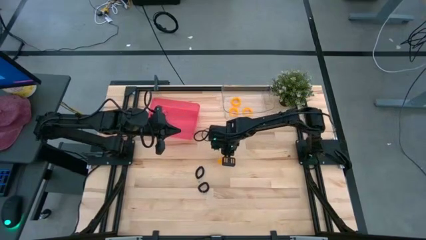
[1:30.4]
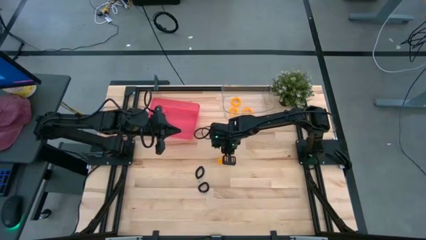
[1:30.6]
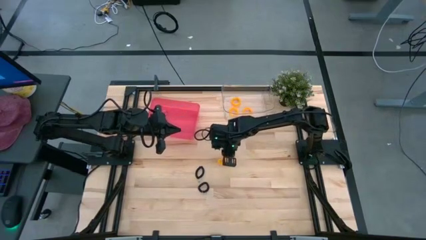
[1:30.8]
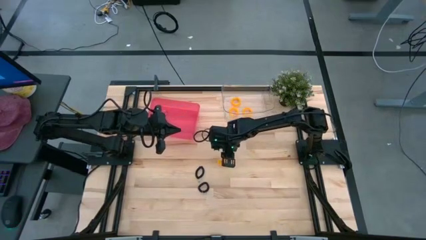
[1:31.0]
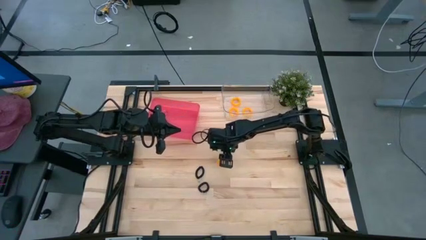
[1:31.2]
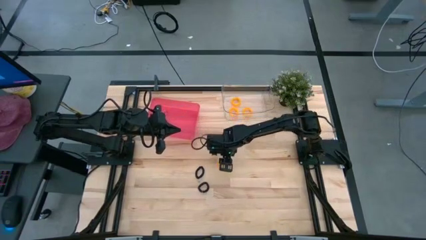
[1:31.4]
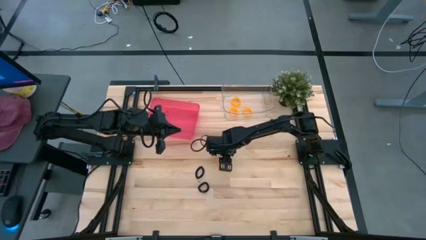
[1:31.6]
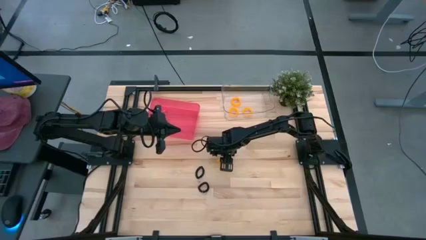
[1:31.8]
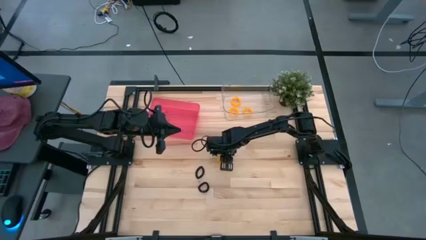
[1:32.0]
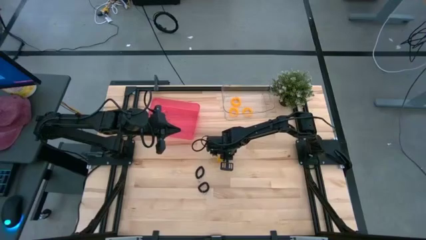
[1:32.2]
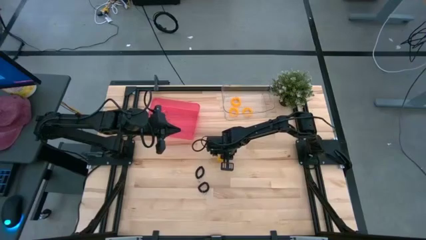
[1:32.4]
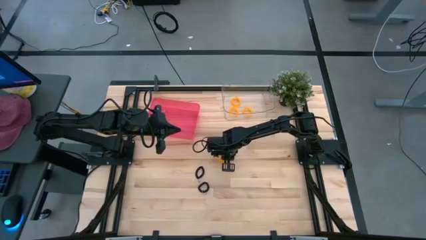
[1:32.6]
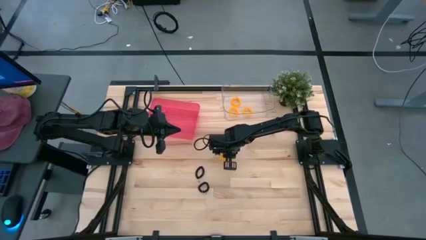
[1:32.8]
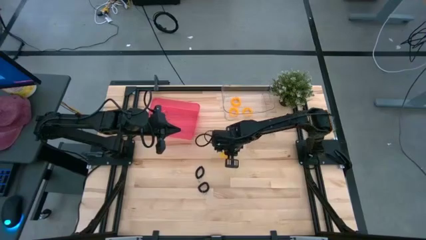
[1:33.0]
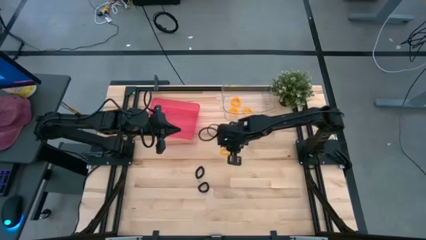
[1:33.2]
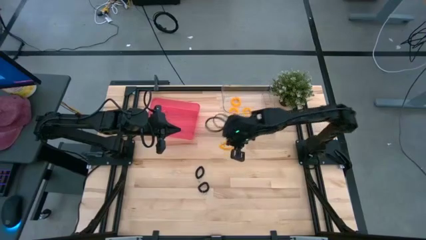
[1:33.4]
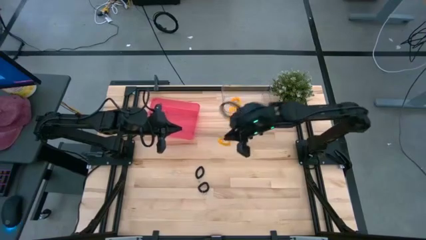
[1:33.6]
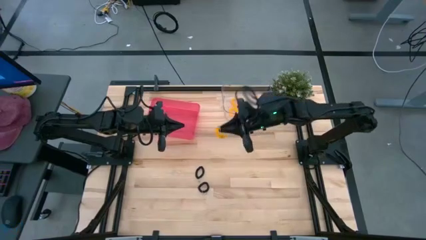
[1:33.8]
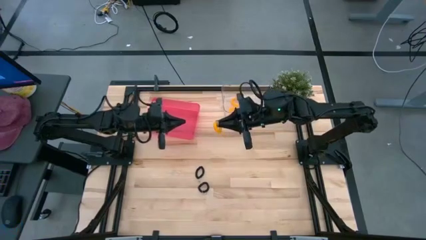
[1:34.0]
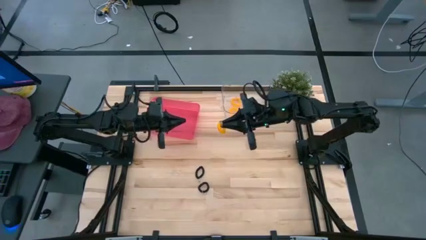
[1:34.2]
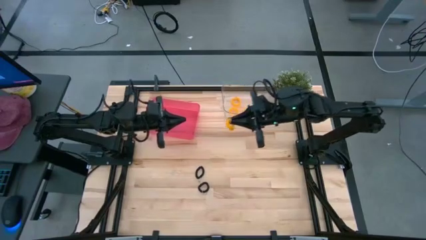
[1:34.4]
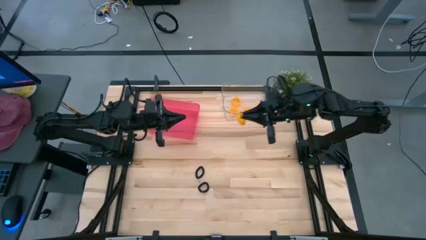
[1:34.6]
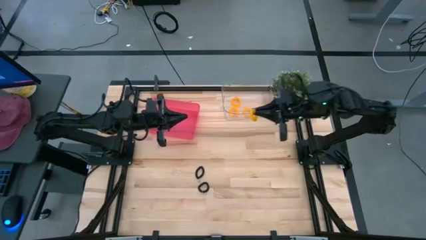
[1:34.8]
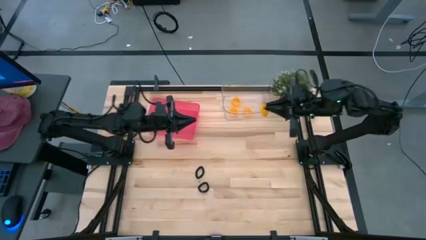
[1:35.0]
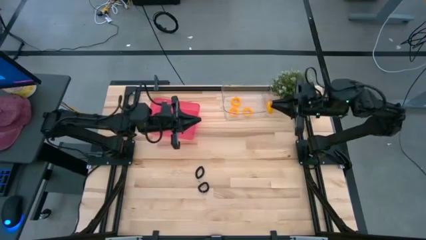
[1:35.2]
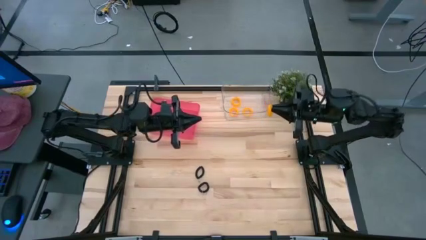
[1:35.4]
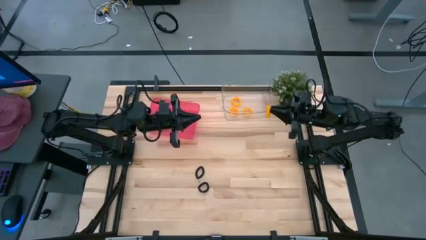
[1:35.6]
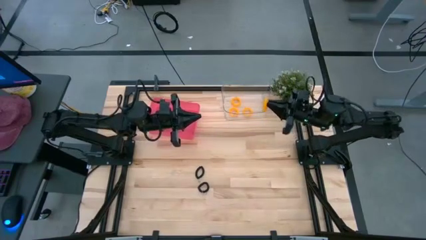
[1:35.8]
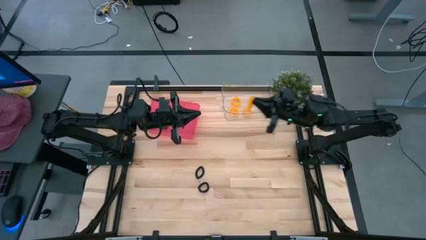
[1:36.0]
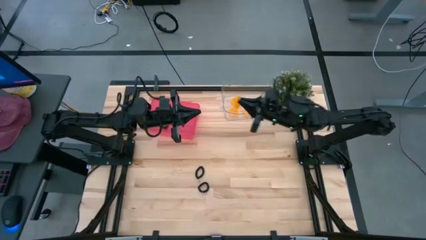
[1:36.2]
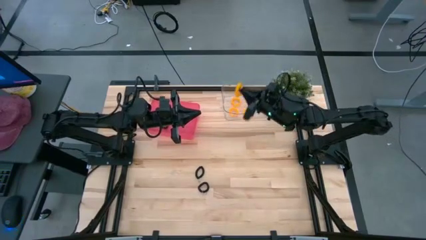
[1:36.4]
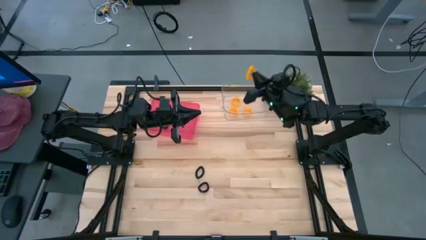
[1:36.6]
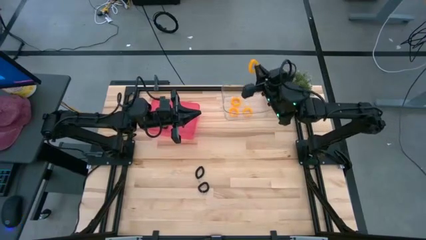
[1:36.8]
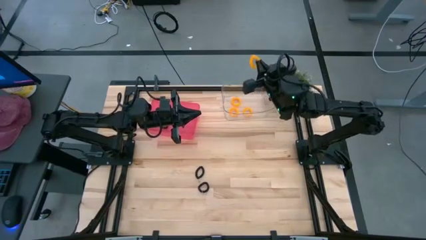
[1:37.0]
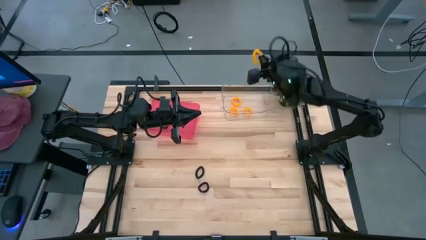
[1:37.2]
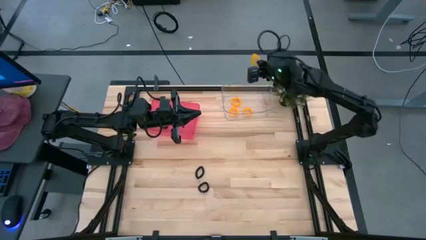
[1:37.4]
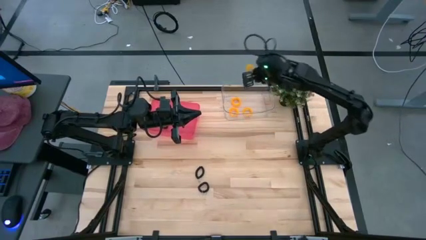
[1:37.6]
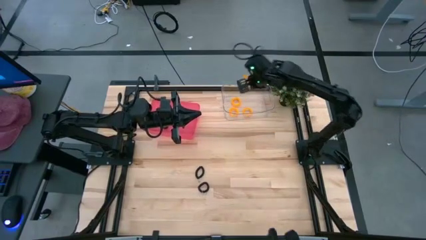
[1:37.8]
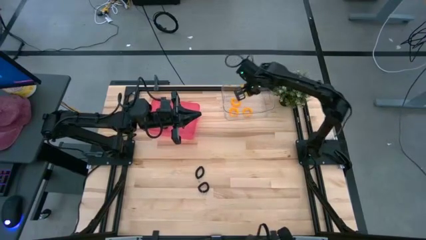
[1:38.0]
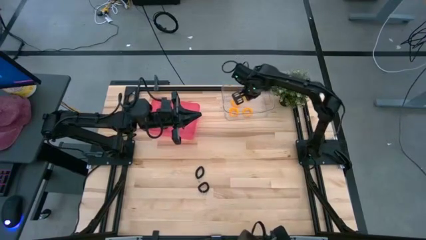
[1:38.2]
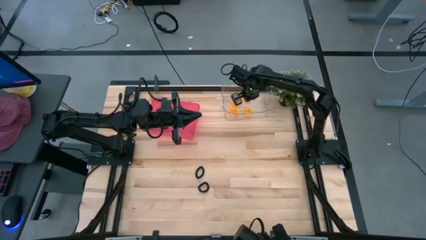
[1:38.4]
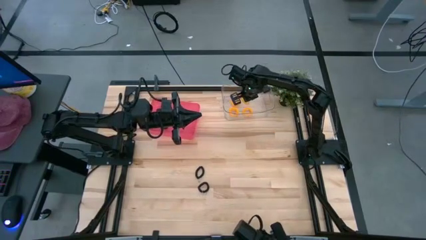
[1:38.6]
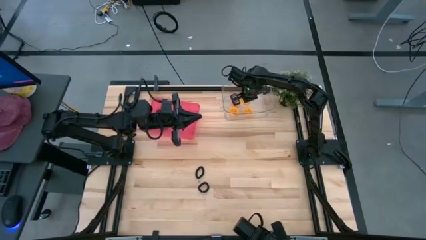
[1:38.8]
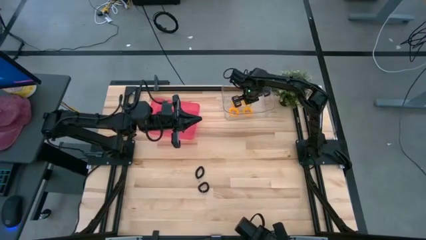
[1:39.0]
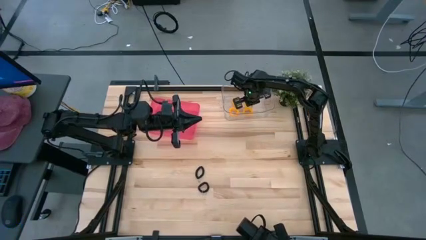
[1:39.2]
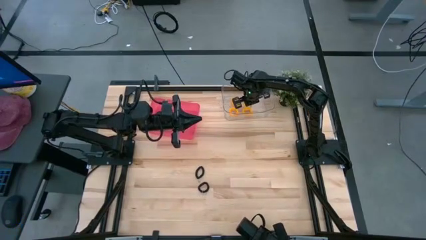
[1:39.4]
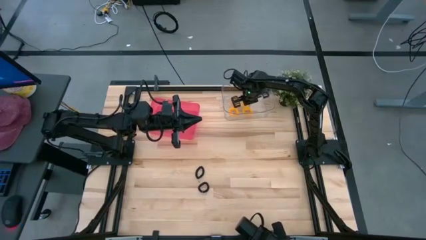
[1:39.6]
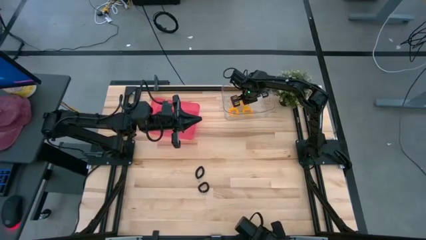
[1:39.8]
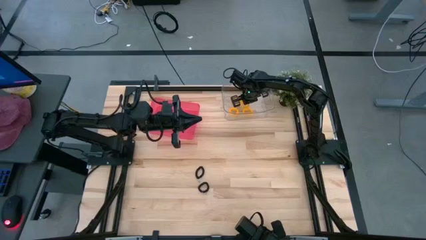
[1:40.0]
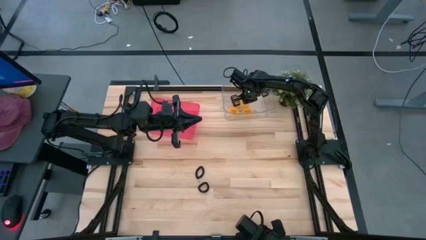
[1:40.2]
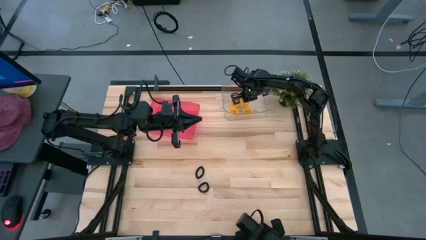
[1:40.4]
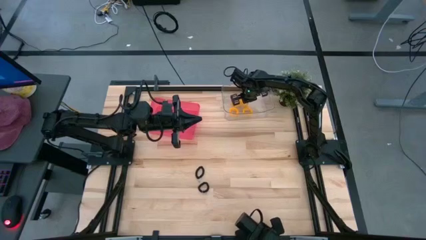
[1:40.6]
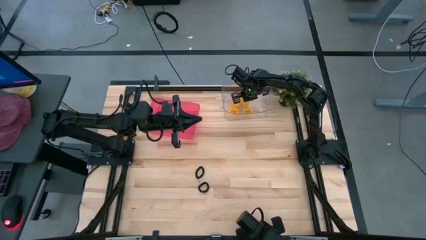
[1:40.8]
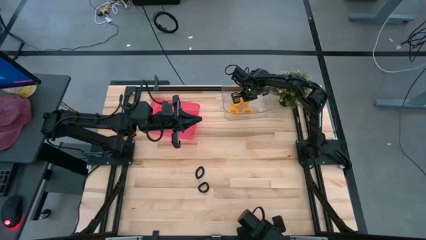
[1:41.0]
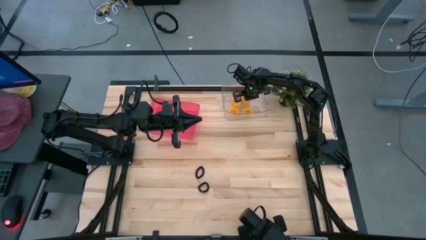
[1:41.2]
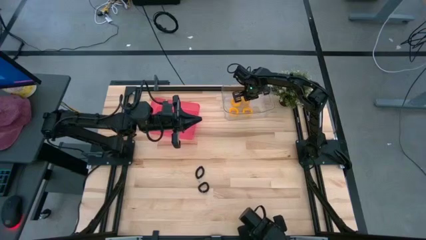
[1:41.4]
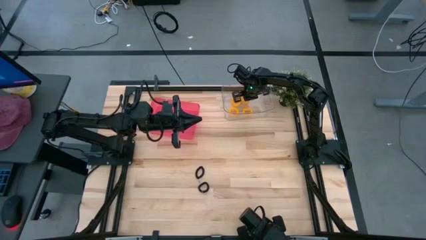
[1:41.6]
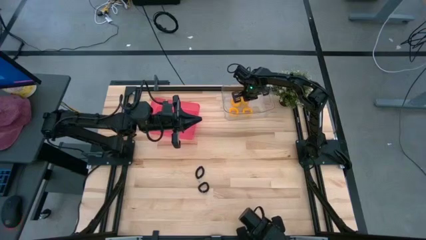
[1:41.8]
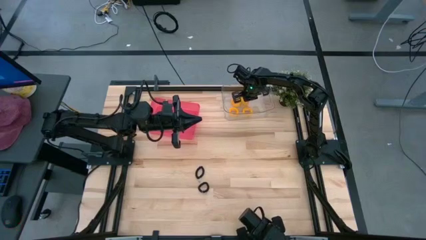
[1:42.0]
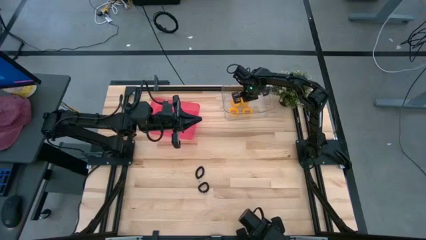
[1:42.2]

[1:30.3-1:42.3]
Task: Sort spring keychains
Put the yellow spring keychain into the transparent bin
